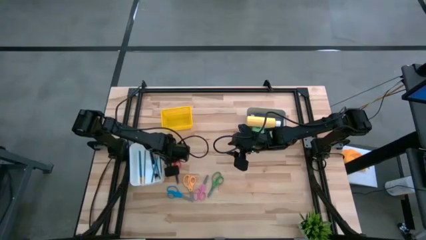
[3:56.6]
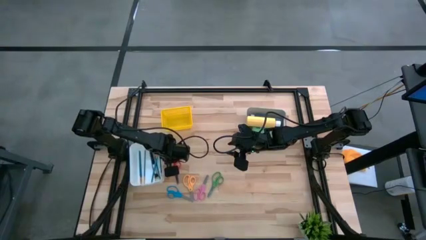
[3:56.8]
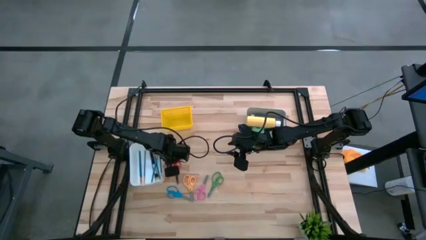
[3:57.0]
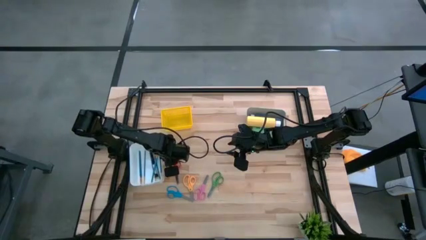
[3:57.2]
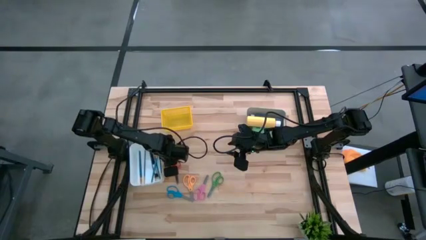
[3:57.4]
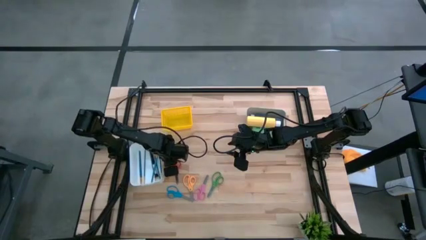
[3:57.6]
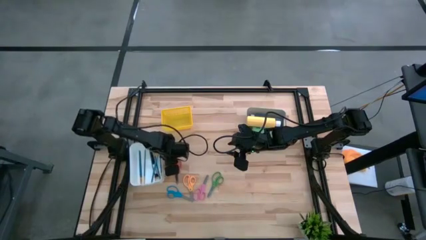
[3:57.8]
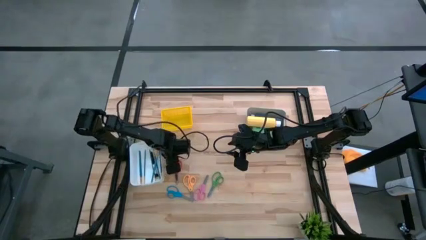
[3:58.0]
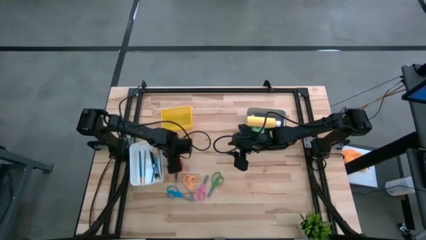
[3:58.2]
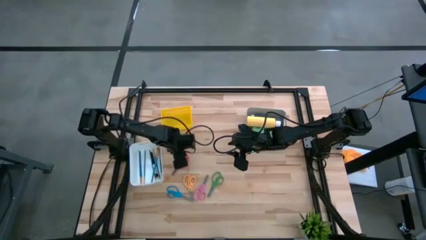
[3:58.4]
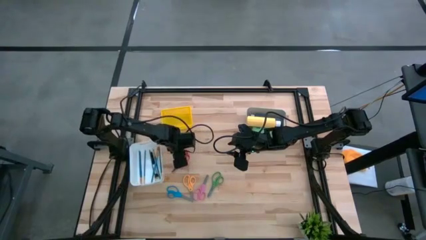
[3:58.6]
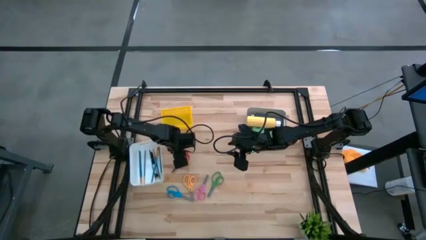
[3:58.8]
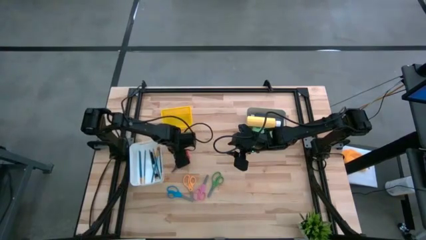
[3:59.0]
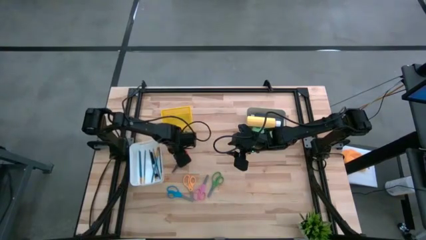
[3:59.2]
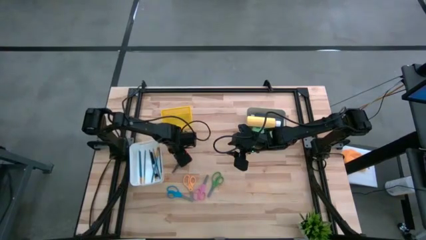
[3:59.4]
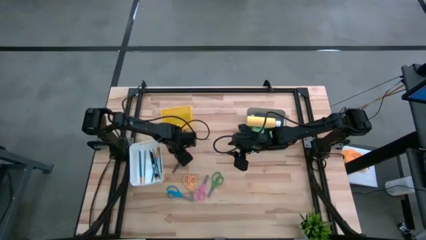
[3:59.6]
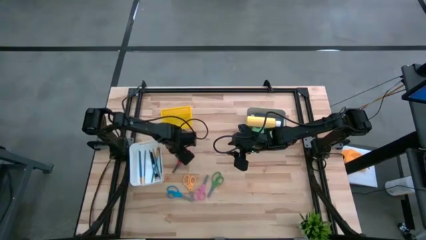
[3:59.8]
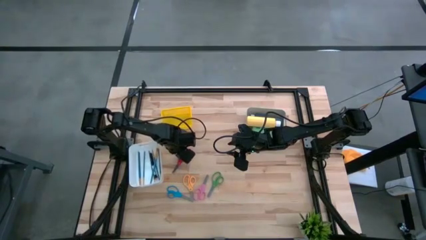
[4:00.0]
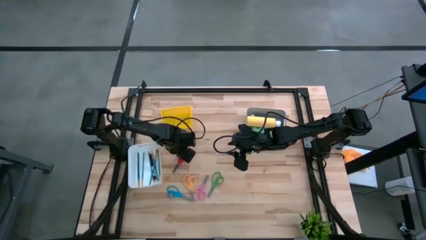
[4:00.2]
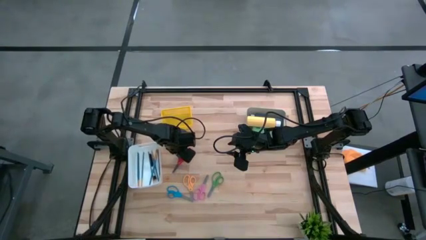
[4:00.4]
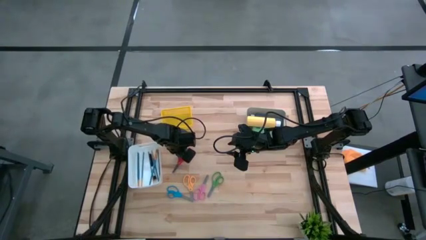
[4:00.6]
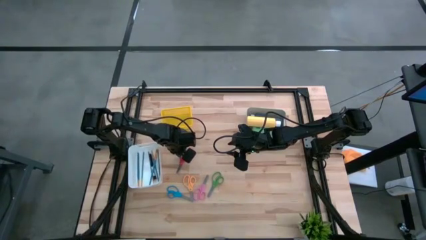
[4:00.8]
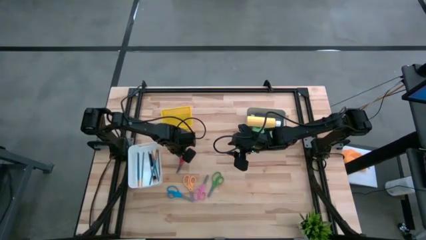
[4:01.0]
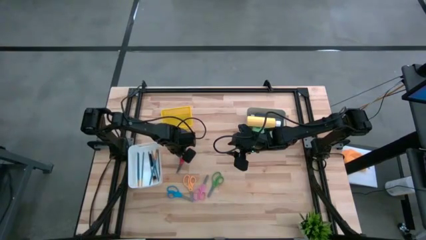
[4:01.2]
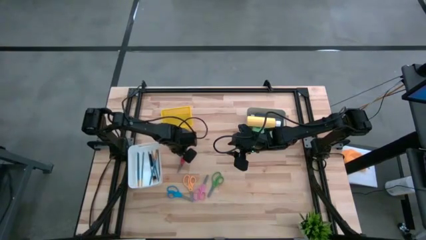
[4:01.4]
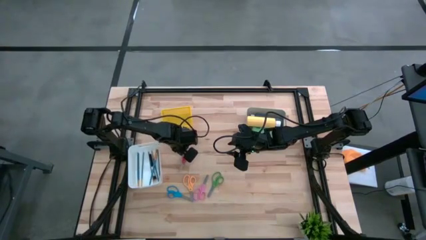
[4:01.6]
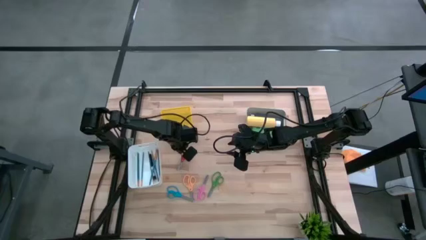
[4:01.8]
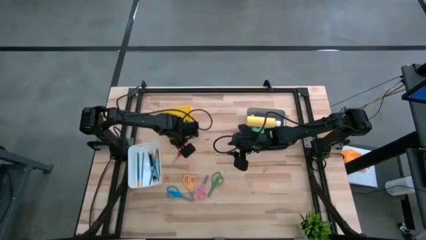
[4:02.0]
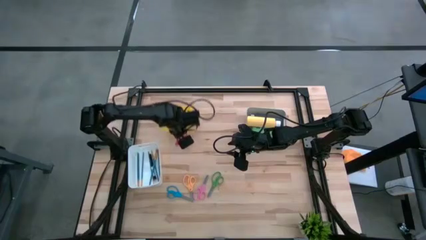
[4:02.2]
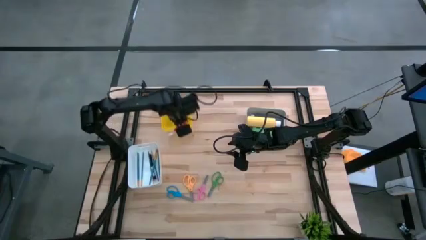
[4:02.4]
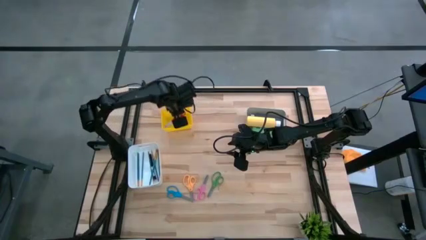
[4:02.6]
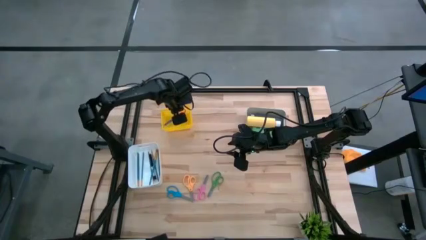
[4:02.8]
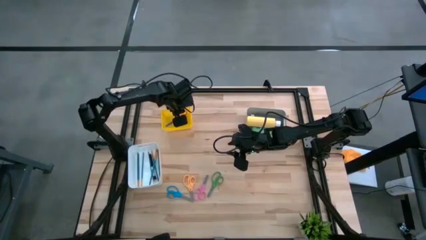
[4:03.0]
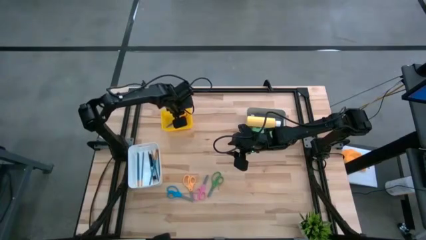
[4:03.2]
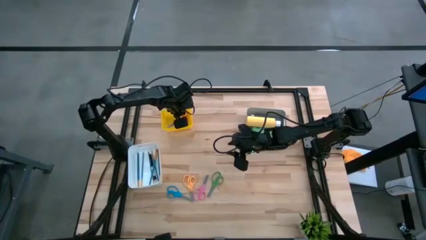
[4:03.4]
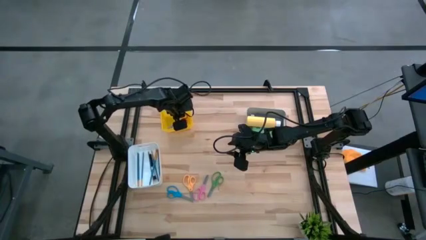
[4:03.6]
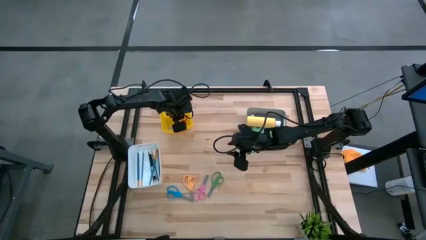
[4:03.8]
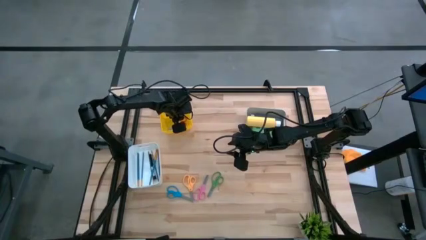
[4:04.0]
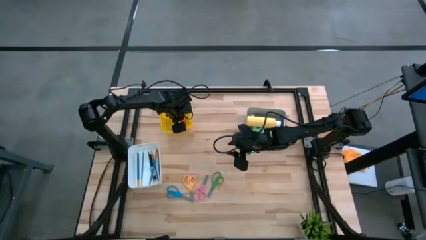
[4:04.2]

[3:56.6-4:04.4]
Task: Pick & Place Paint Supplies
Put the red scissors into the yellow bin

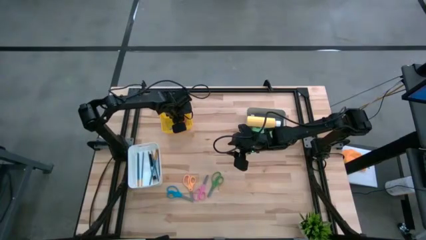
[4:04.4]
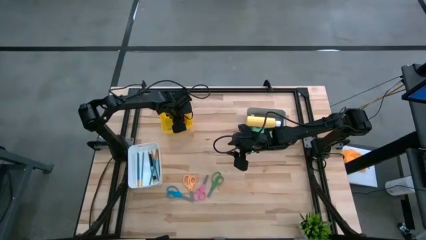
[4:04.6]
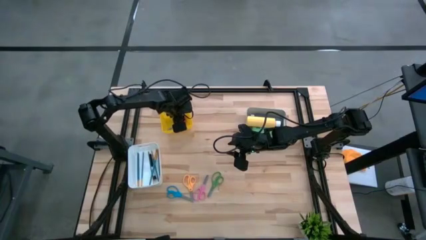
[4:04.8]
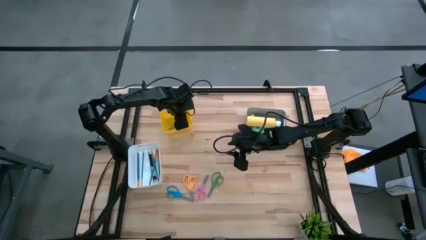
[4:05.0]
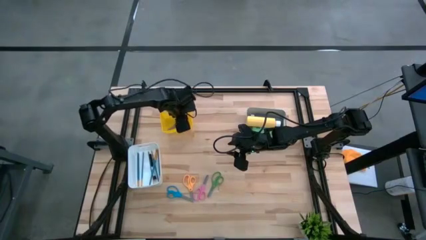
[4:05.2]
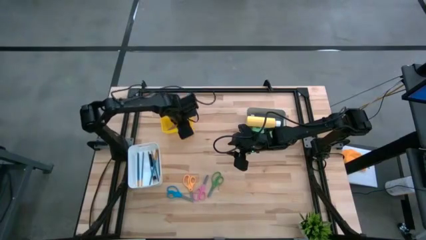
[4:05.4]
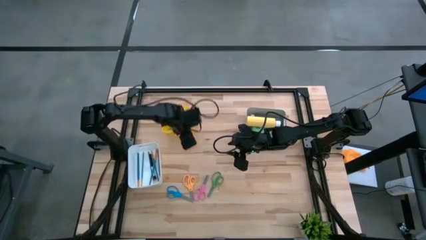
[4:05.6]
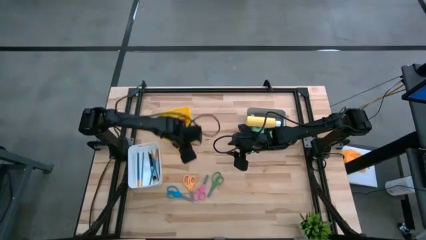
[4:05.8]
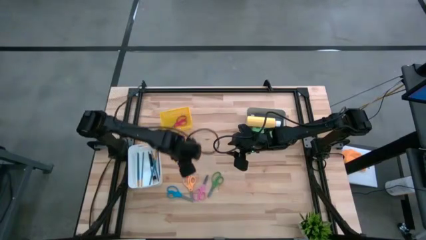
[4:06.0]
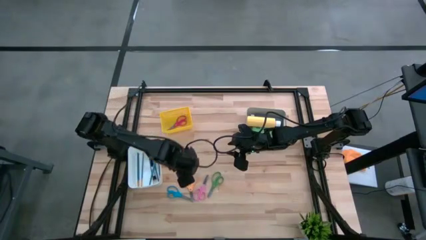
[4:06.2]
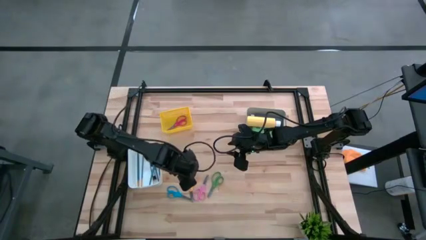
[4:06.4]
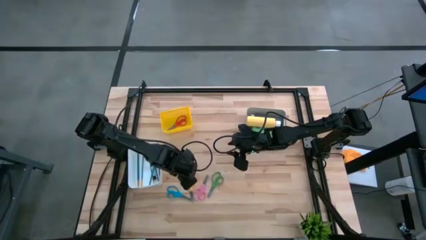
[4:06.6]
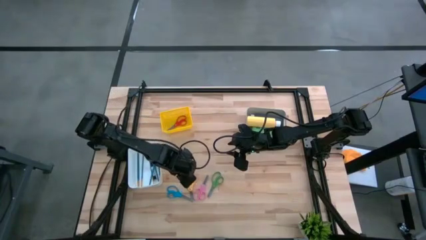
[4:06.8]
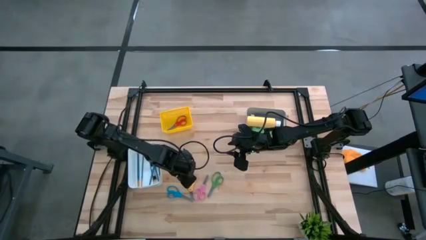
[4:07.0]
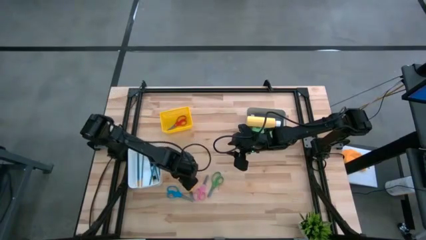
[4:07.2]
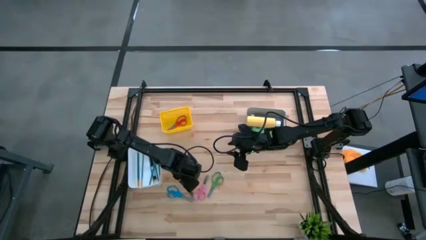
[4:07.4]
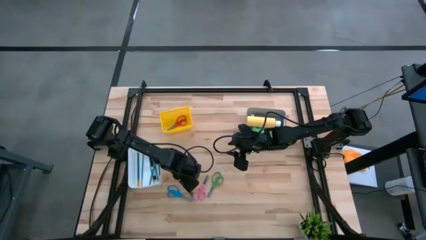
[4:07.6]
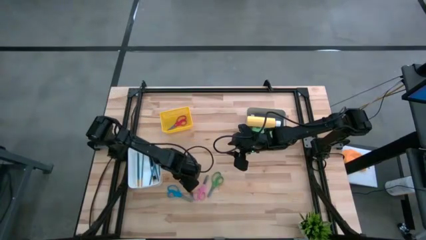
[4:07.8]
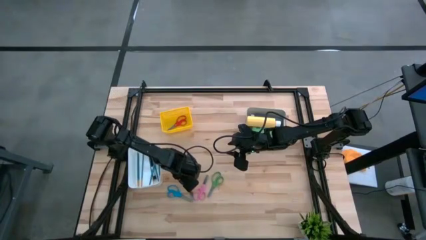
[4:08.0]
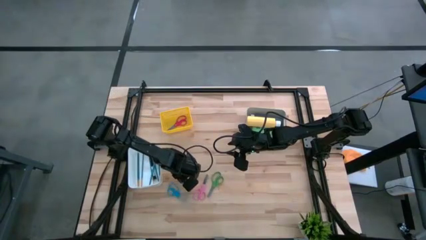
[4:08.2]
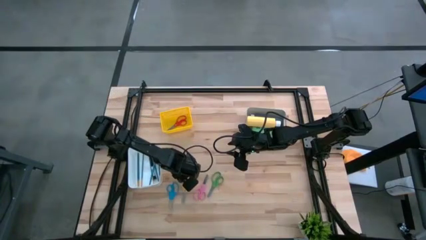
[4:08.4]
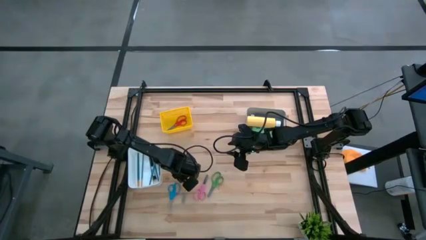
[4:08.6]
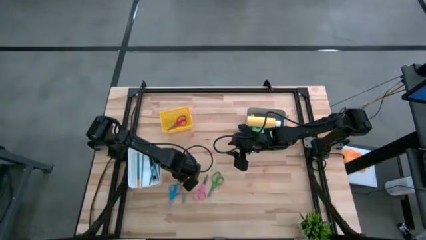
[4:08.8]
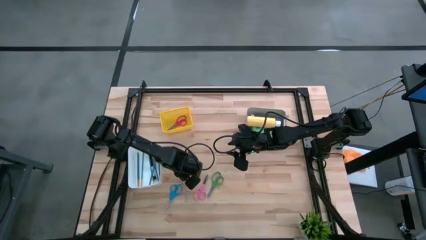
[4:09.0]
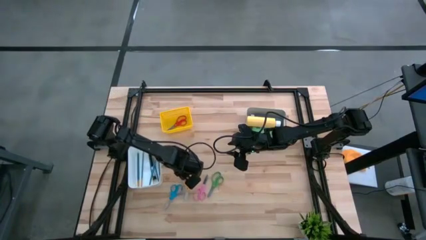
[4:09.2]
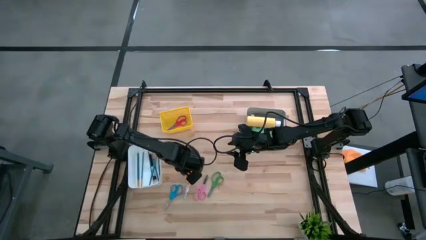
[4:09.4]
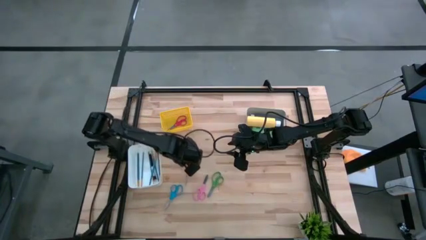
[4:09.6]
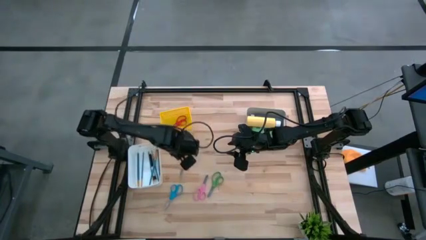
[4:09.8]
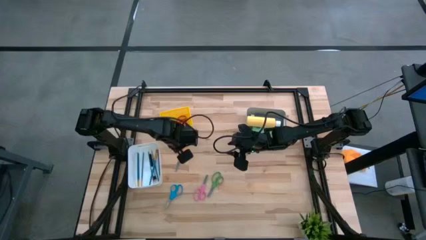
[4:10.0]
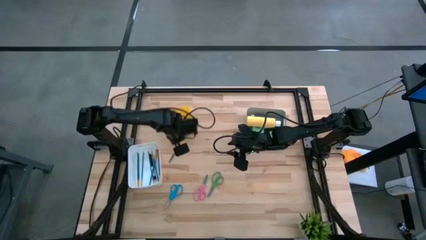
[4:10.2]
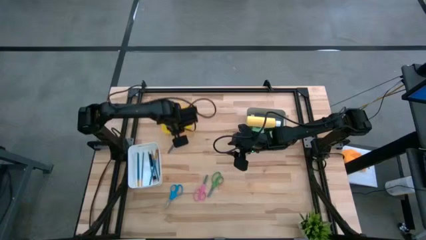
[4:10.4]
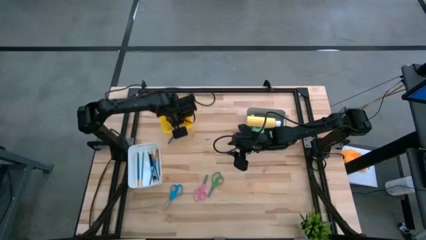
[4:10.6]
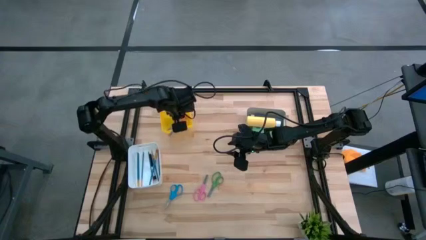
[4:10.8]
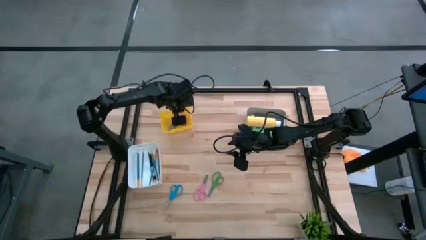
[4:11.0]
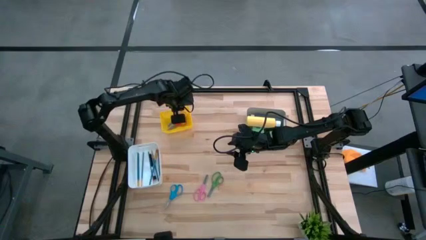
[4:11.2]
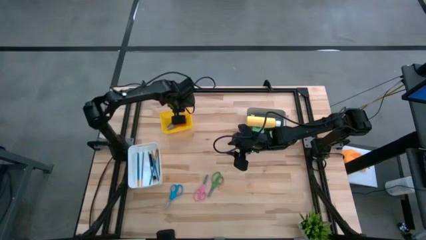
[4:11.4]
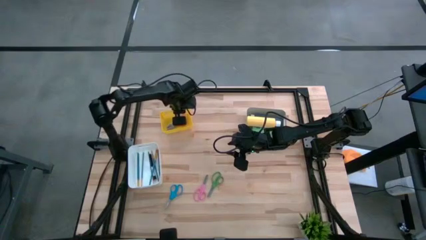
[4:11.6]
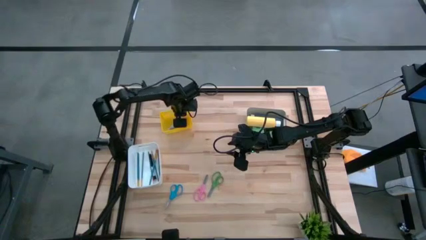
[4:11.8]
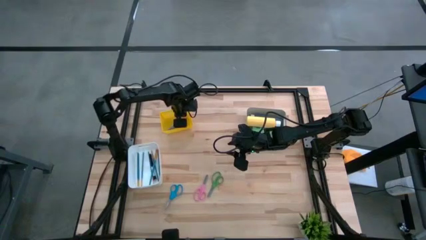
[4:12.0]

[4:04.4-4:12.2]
Put the yellow scissors into the yellow bin

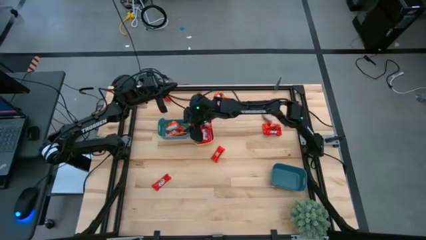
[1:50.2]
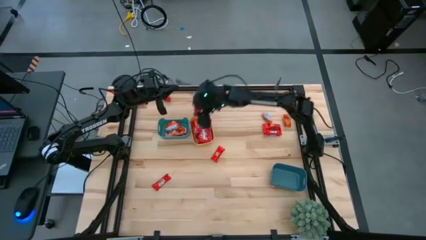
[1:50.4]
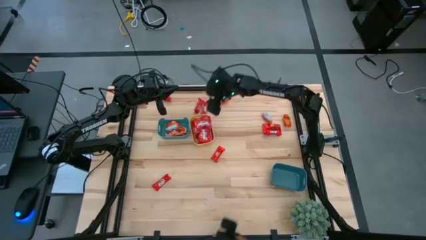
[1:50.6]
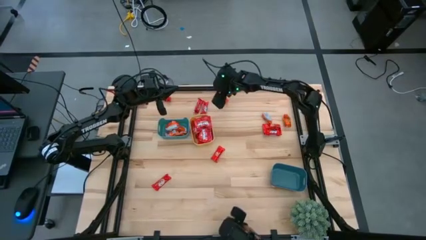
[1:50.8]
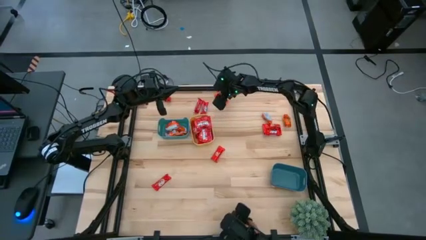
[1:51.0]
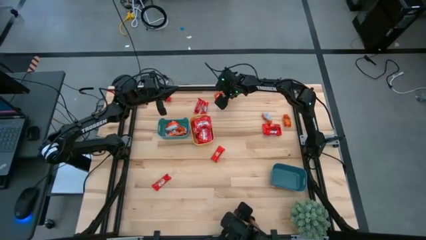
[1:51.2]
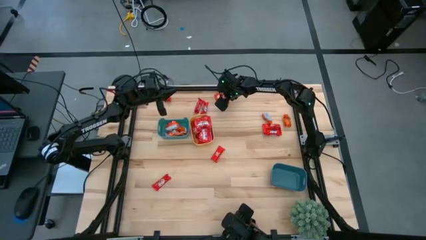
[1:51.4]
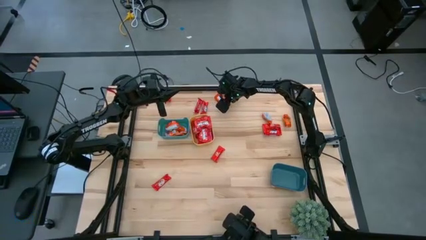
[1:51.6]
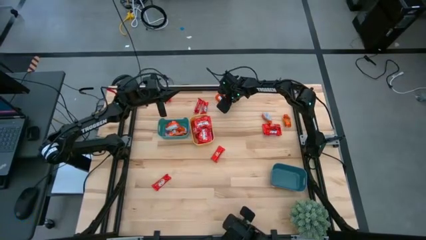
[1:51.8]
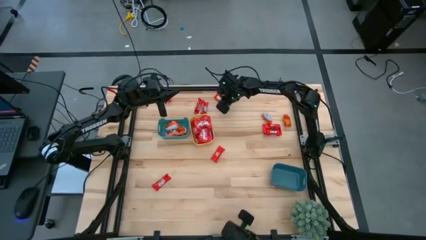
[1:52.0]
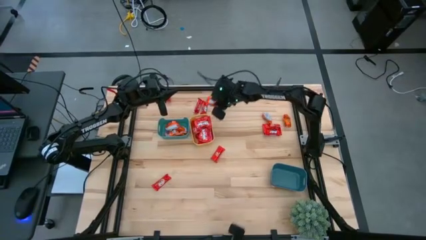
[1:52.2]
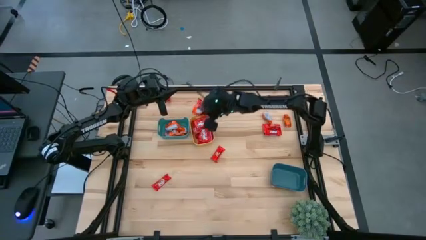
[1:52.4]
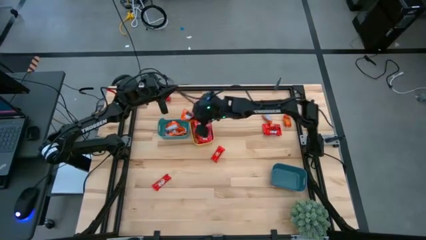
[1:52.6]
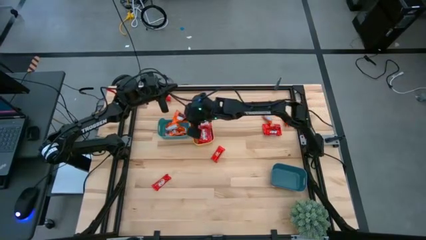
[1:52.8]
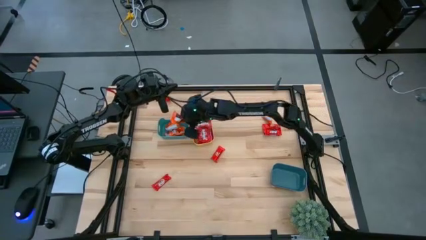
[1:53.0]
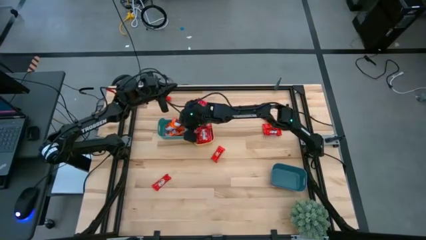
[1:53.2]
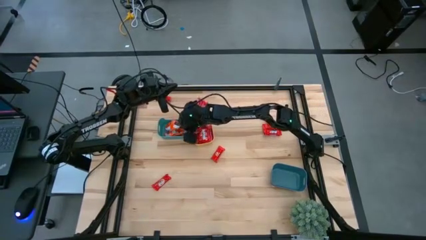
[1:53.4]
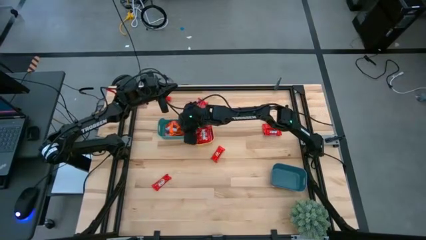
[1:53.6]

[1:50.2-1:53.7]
Task: Sort candy
Put the orange candy into the green bin
